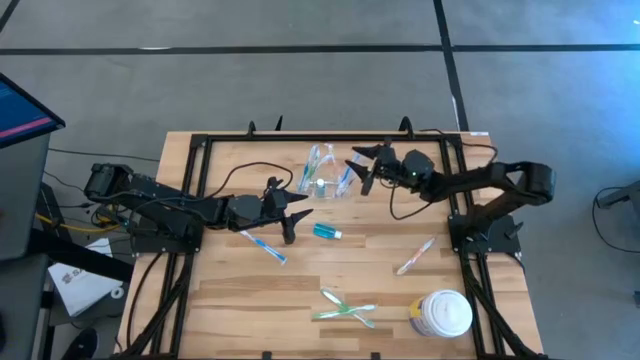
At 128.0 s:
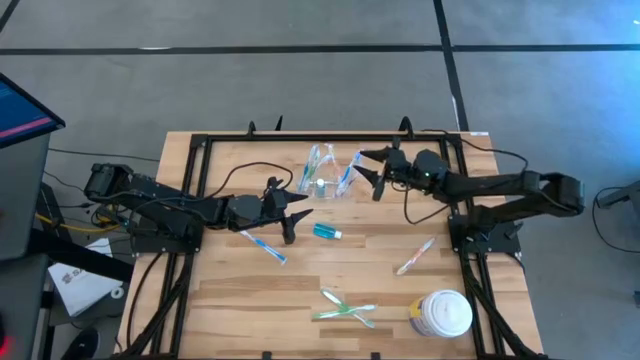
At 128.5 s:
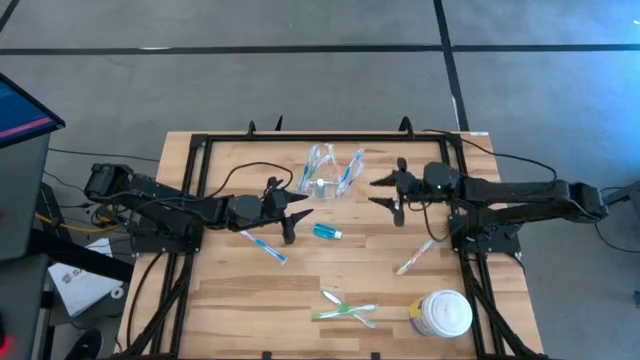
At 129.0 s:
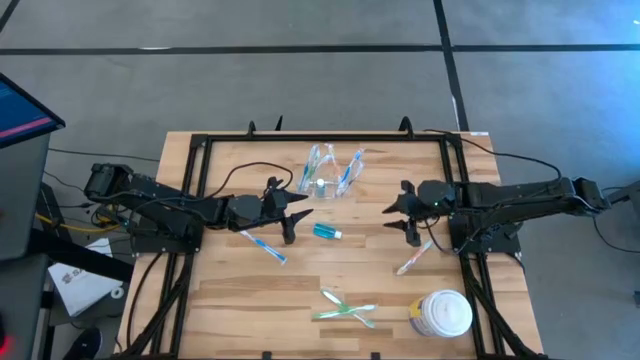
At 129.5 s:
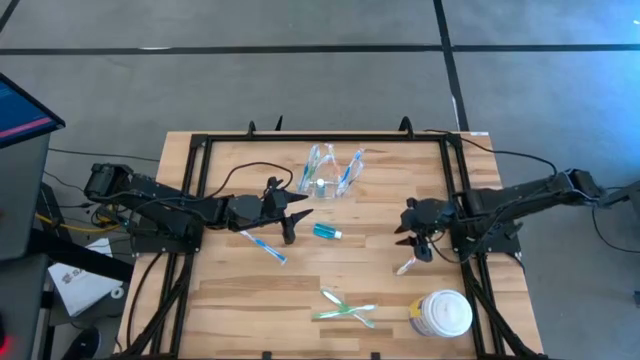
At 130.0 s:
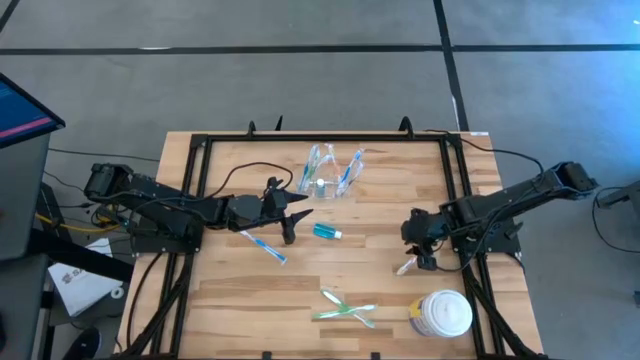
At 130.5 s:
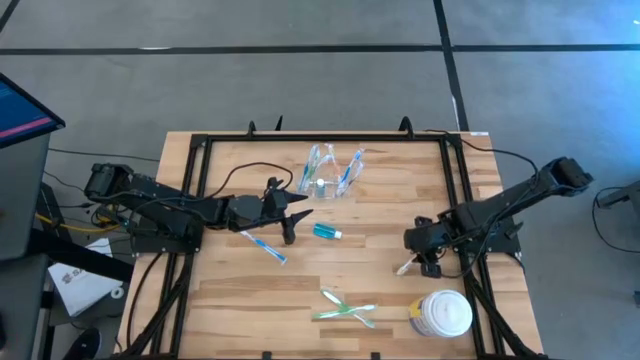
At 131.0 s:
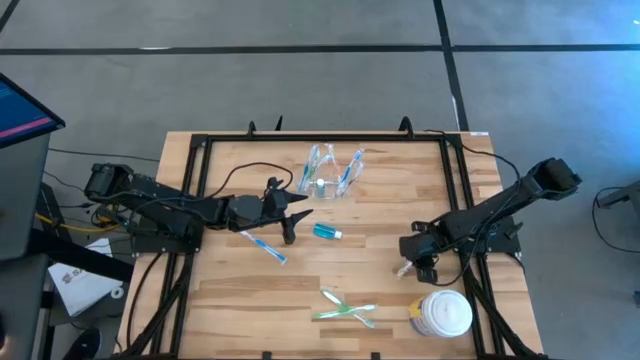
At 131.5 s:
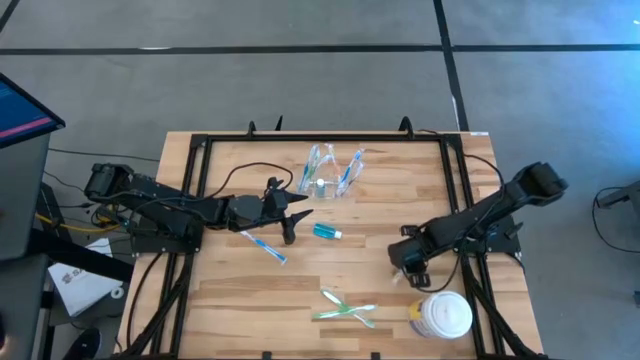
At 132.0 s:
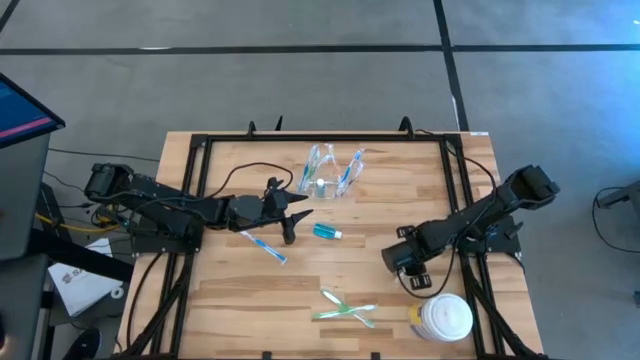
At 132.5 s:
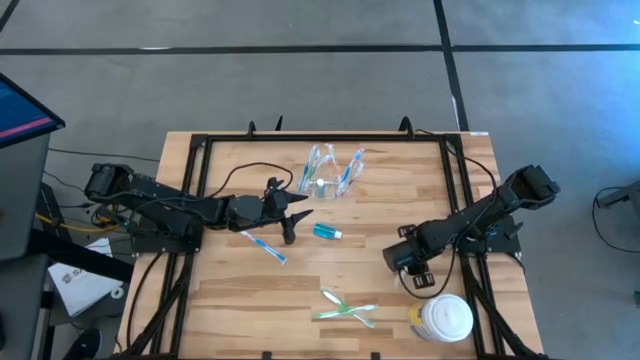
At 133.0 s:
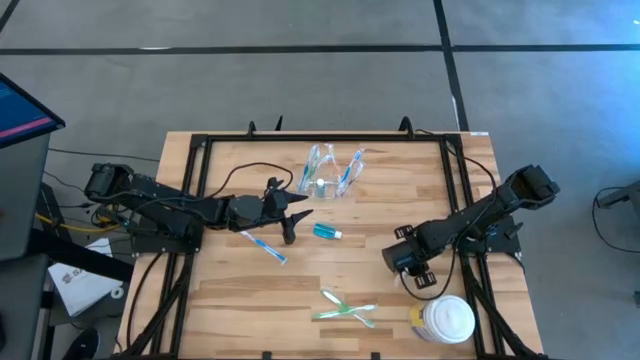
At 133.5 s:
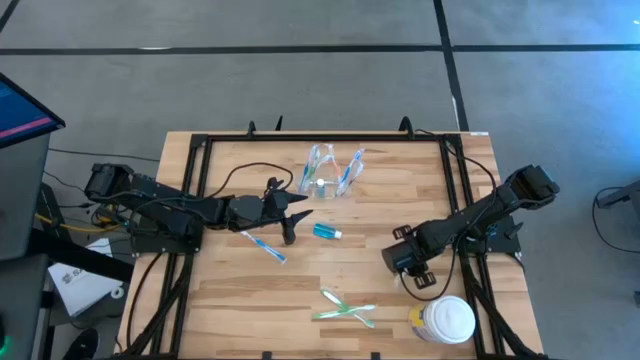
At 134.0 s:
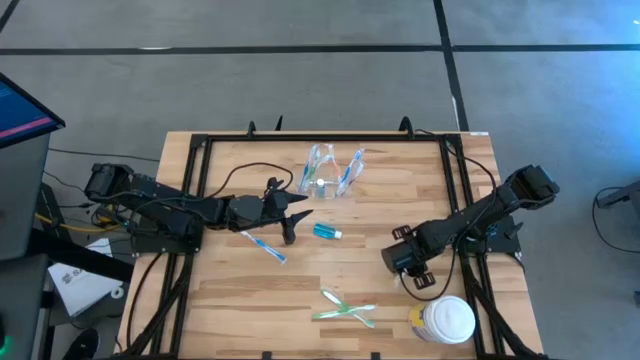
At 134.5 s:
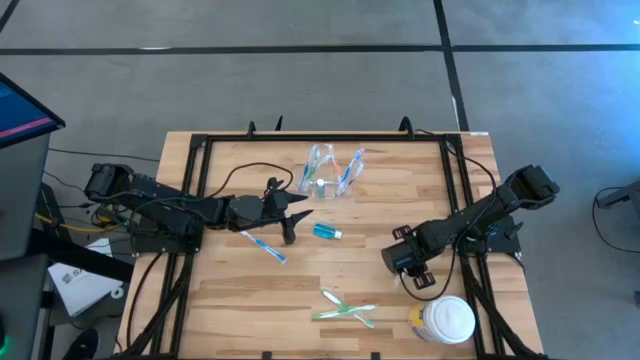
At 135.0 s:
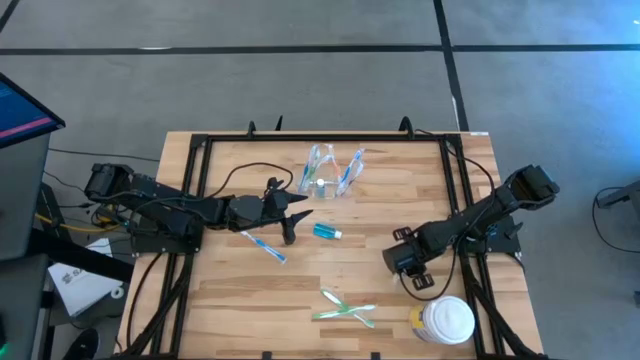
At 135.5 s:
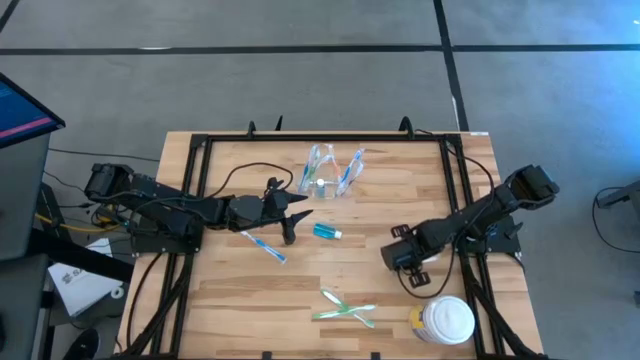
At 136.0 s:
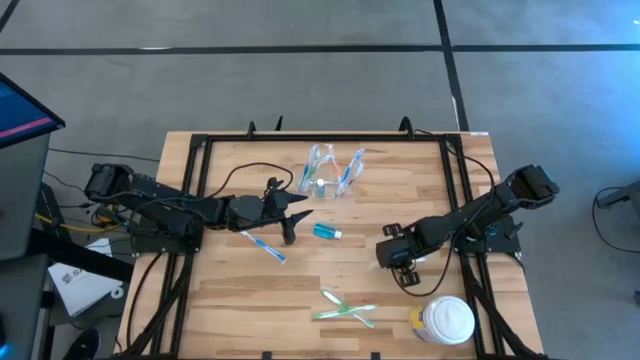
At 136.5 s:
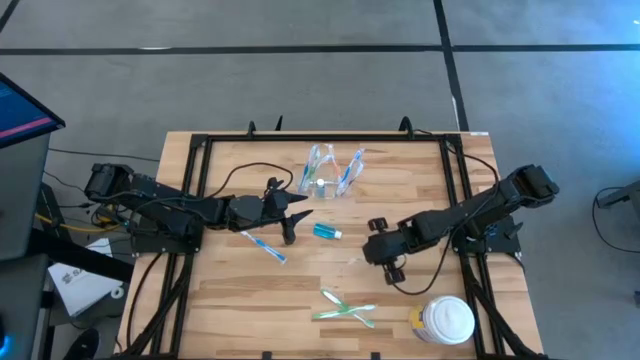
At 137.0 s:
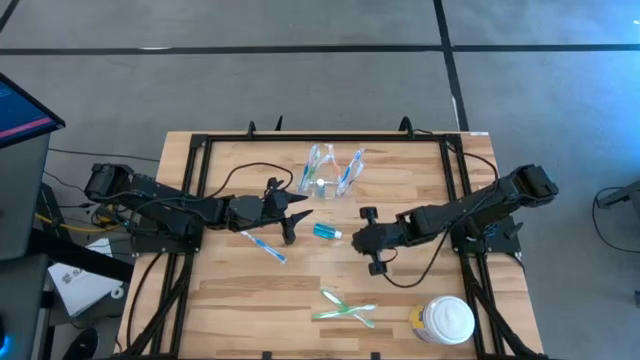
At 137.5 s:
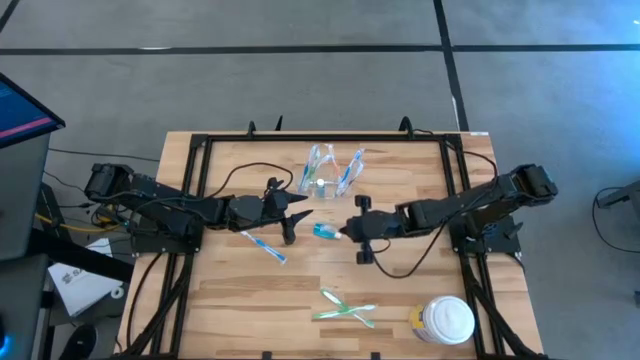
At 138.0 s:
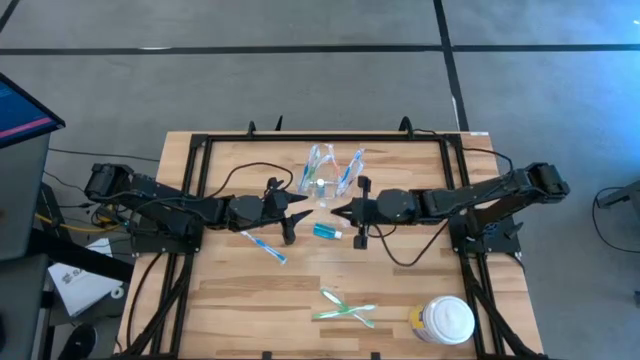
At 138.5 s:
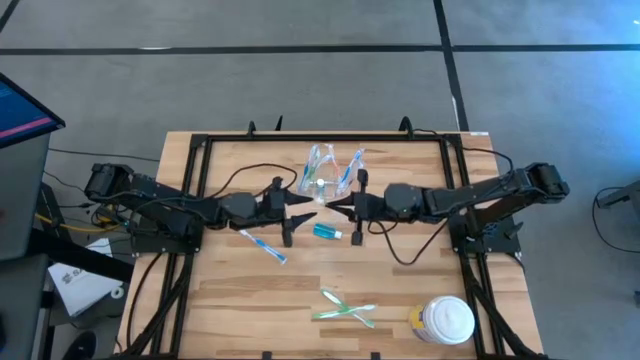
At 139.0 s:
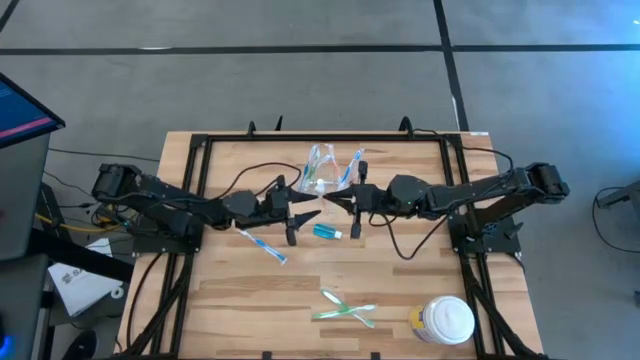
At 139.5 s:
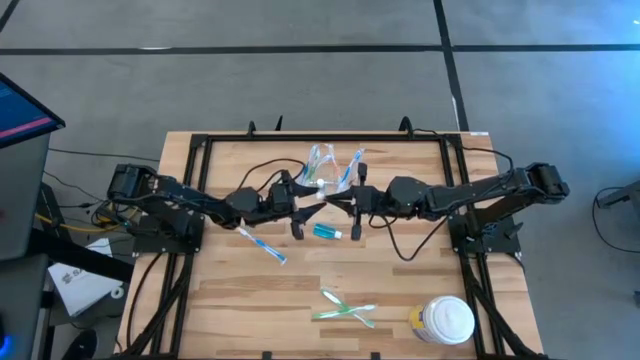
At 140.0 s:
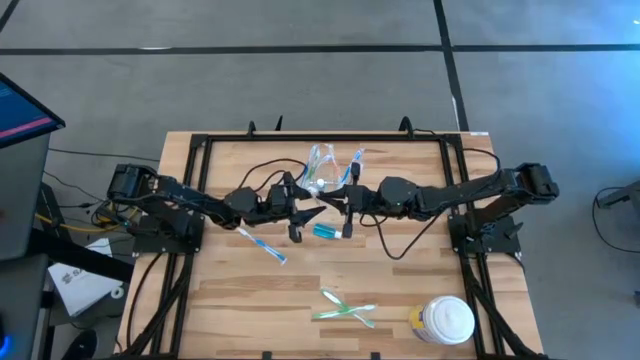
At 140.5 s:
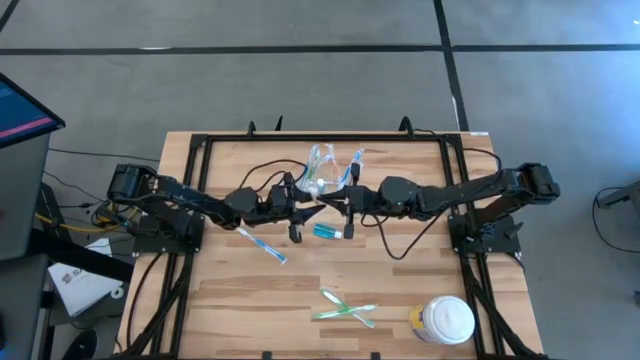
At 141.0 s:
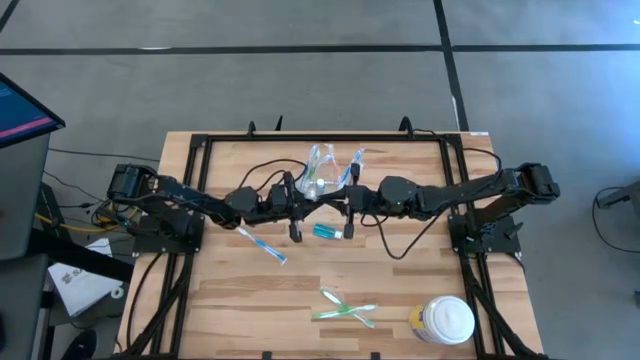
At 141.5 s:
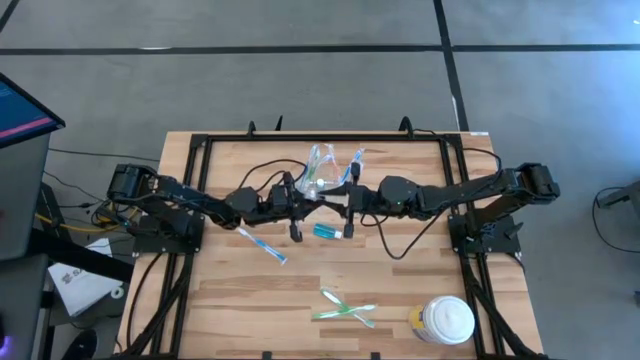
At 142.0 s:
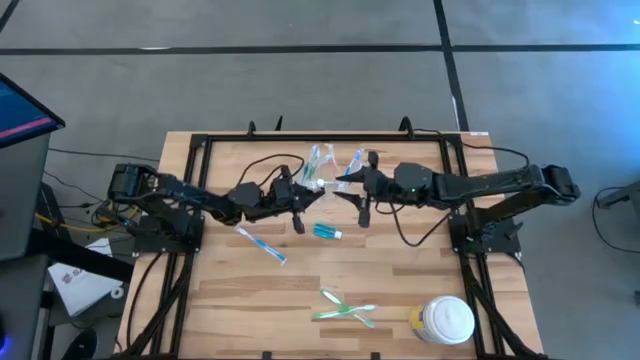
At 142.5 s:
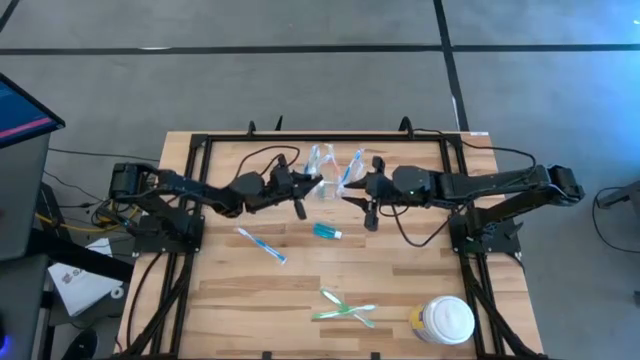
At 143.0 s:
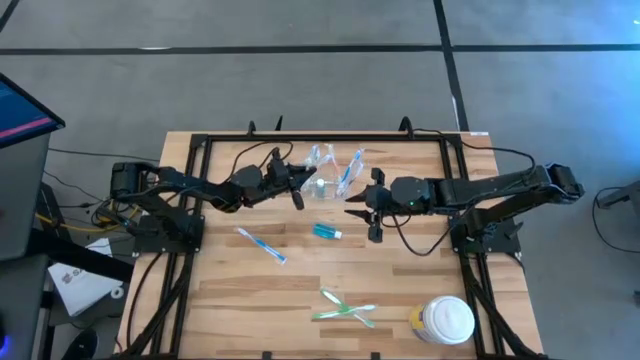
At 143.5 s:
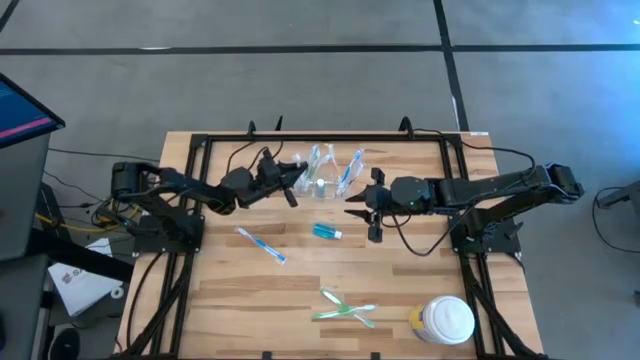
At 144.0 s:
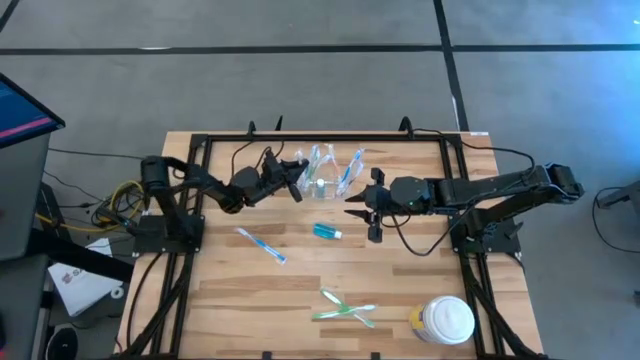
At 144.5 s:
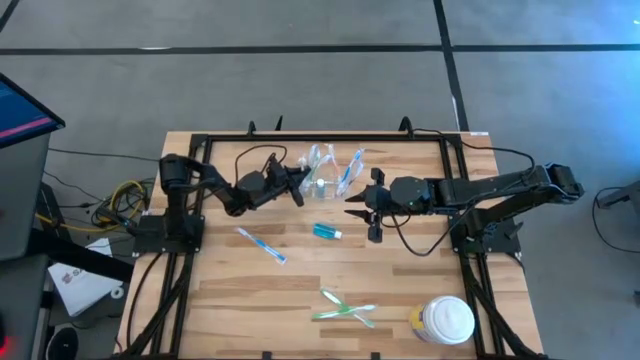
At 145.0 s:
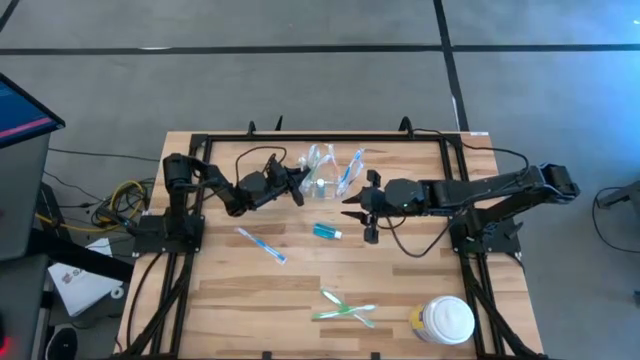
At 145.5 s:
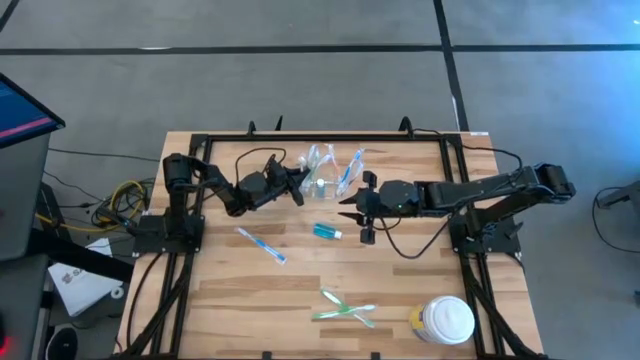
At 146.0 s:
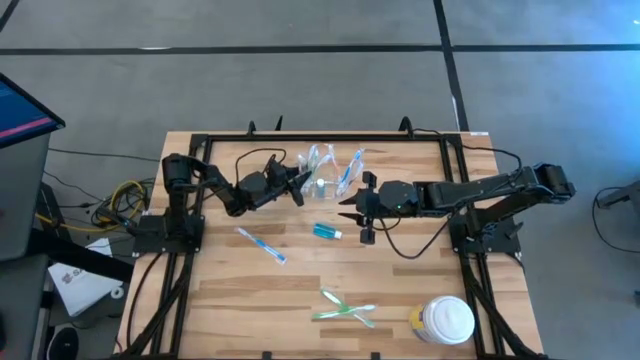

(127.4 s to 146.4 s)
Task: Pick & Place toothbrushing station
Put the orange toothbrush into the transparent organizer

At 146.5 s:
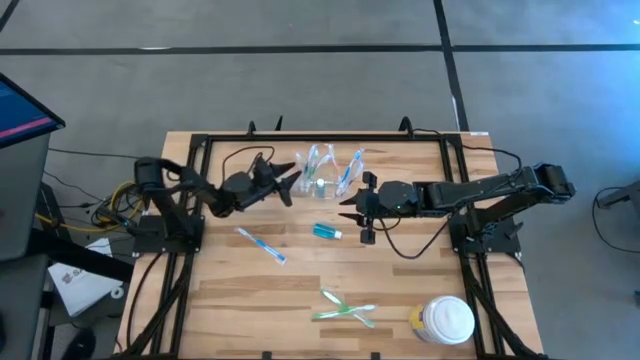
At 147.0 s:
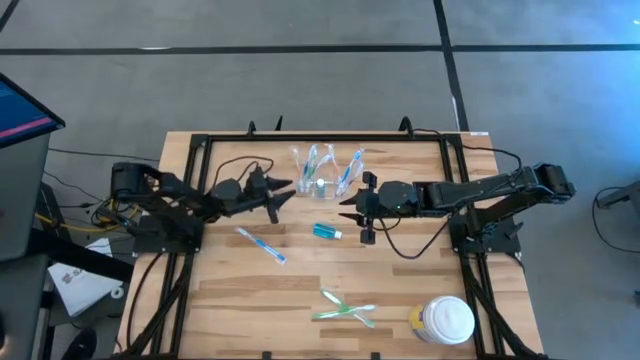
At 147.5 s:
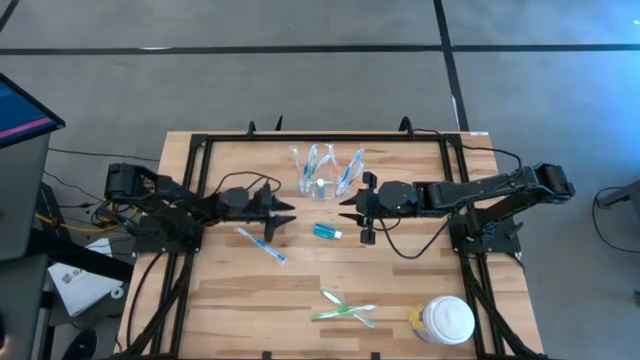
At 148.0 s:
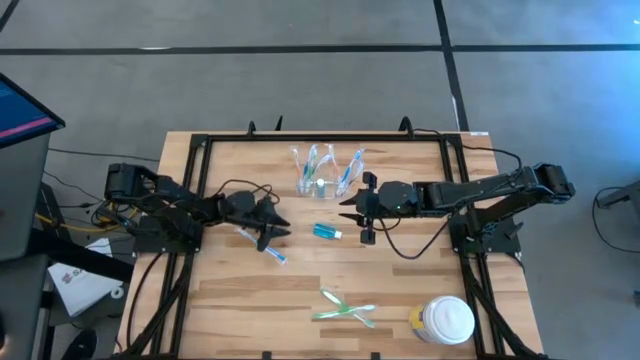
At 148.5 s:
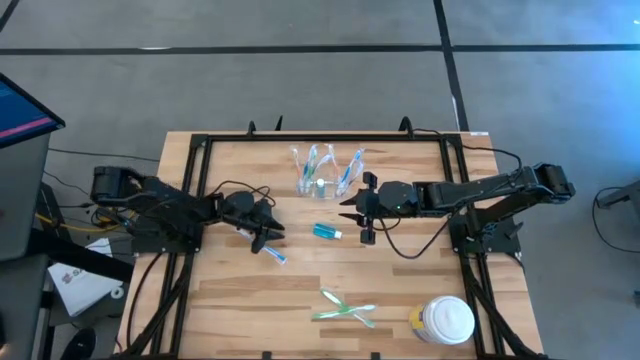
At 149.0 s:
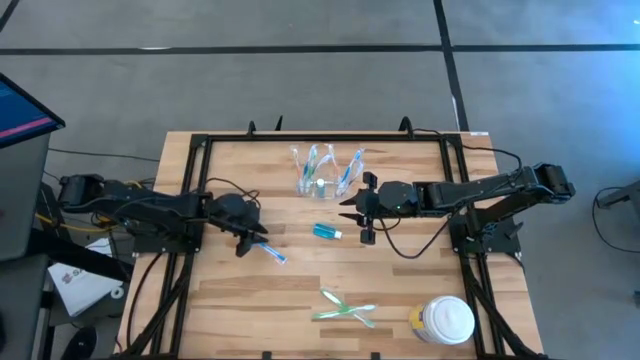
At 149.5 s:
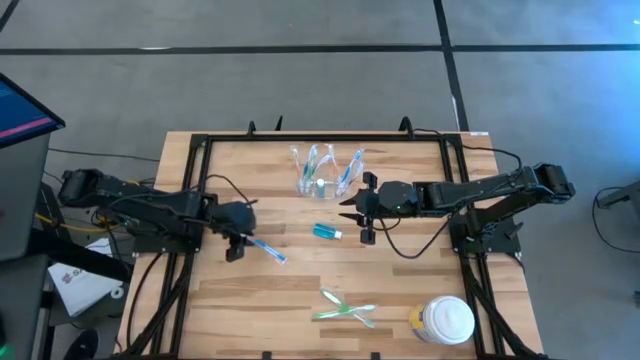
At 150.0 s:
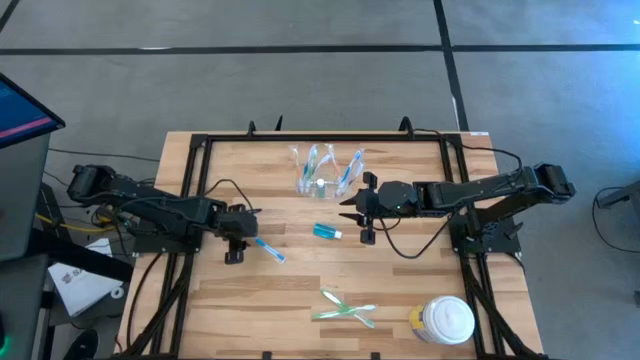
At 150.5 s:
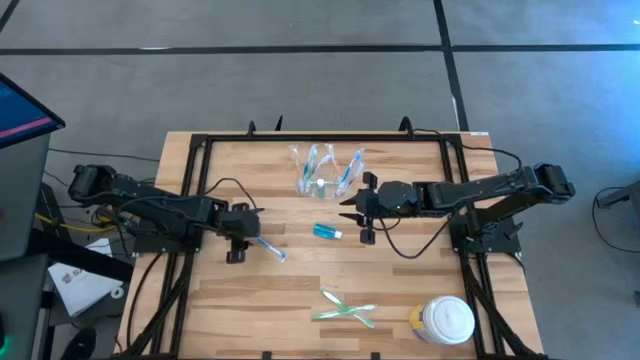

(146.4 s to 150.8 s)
Put the blue toothbrush into the transparent organizer
